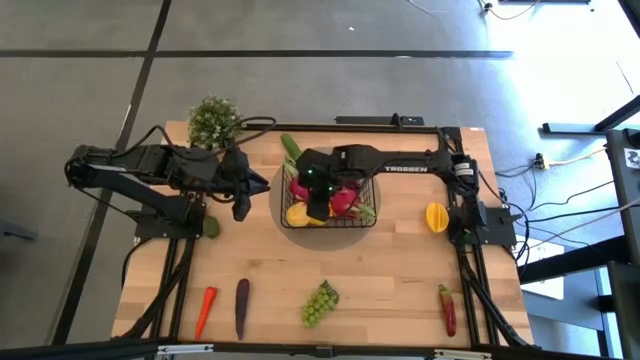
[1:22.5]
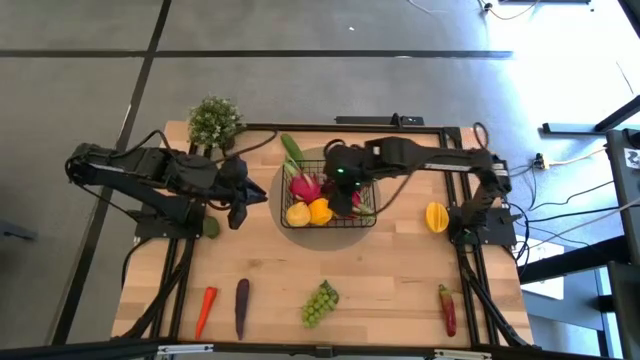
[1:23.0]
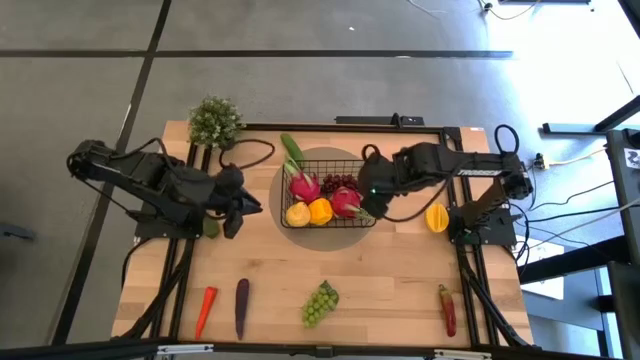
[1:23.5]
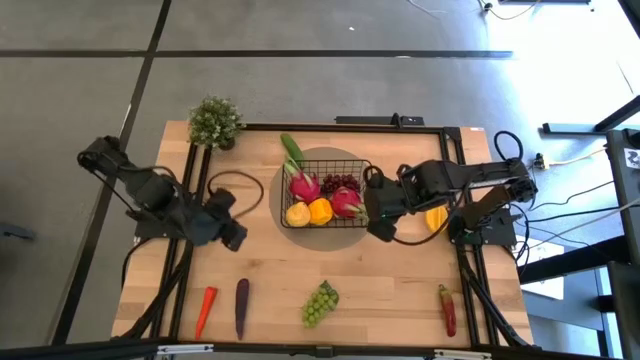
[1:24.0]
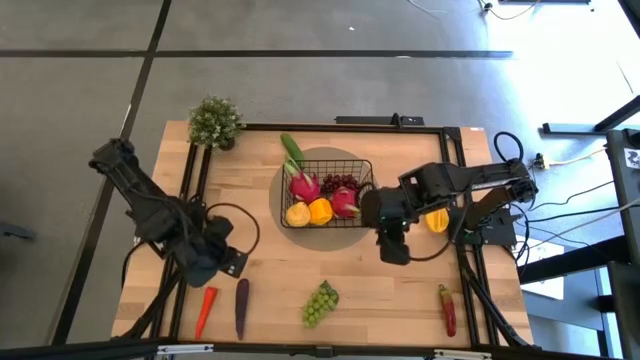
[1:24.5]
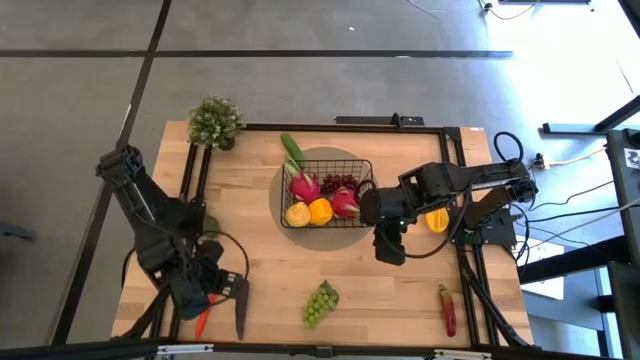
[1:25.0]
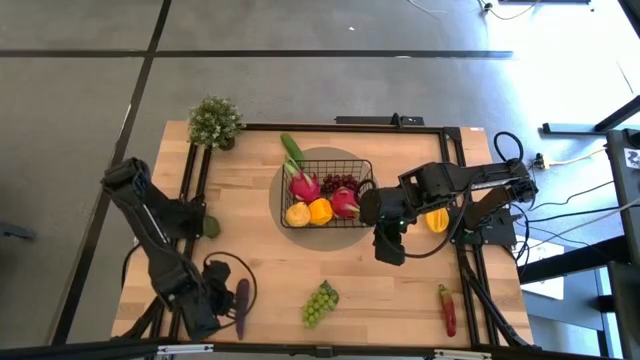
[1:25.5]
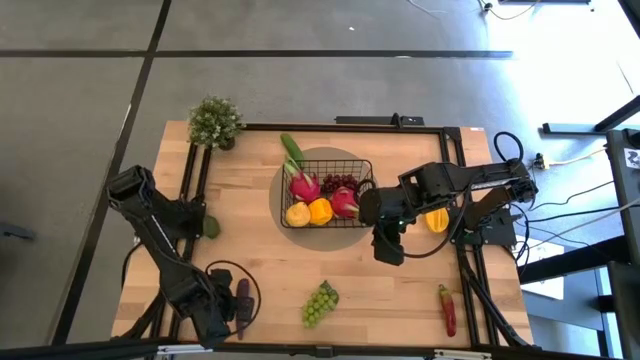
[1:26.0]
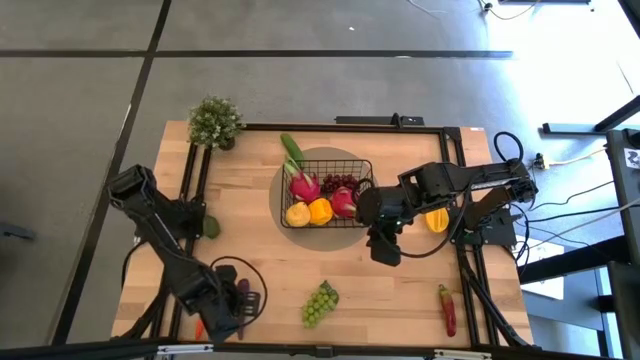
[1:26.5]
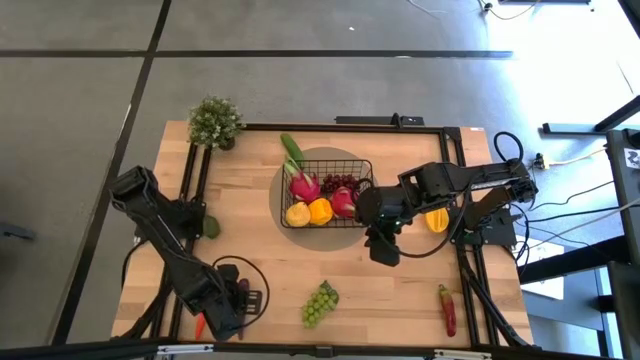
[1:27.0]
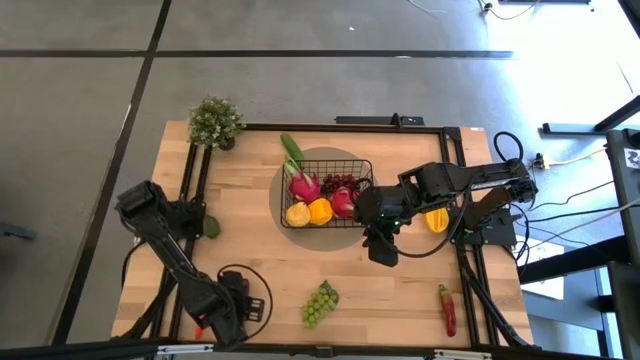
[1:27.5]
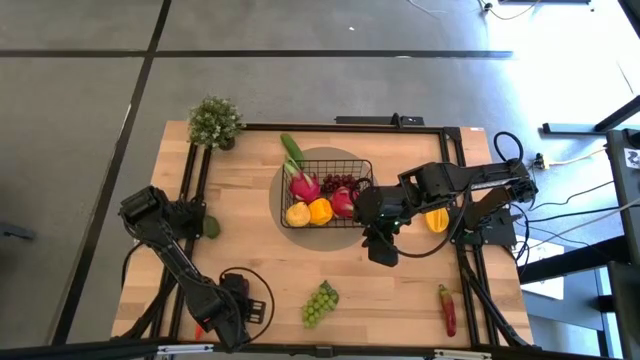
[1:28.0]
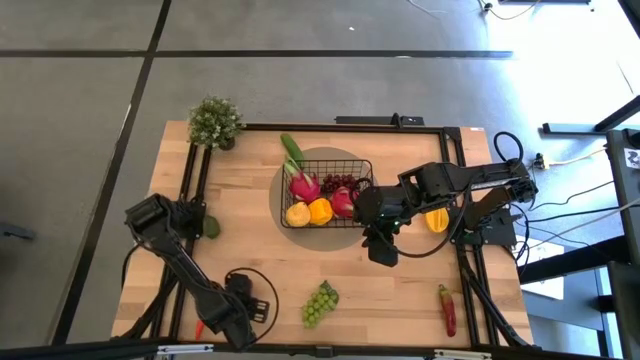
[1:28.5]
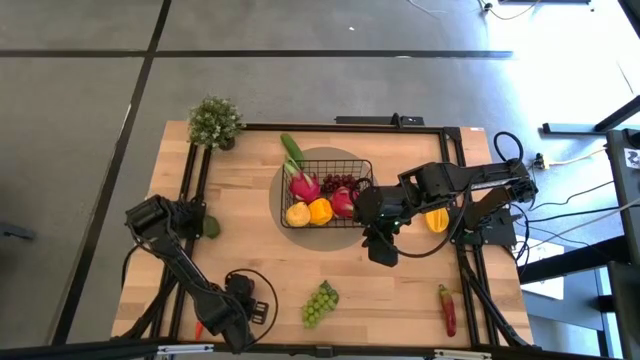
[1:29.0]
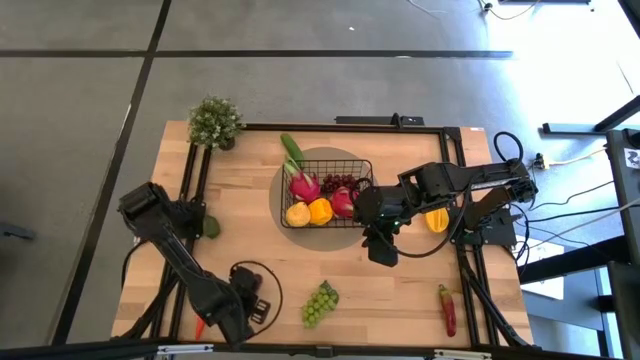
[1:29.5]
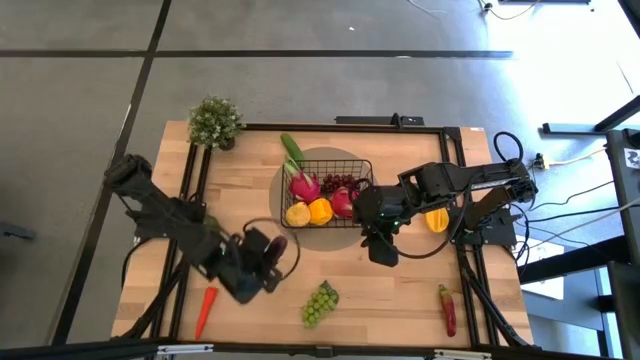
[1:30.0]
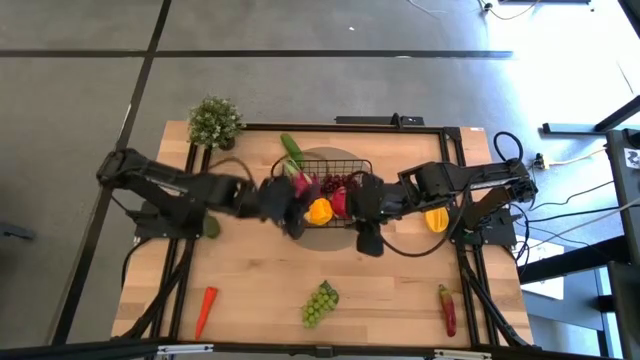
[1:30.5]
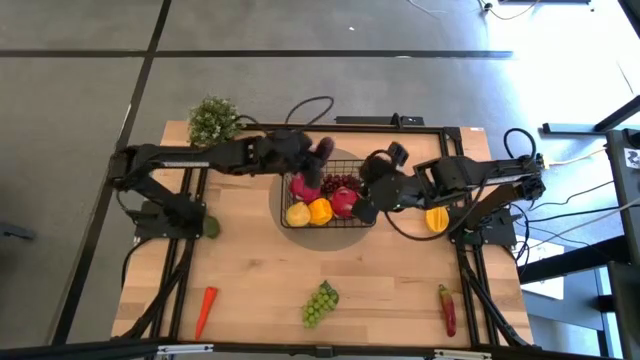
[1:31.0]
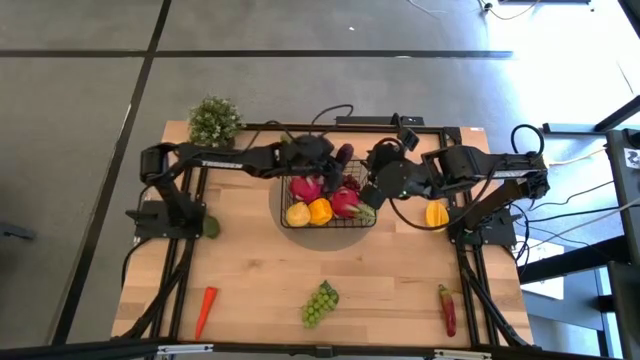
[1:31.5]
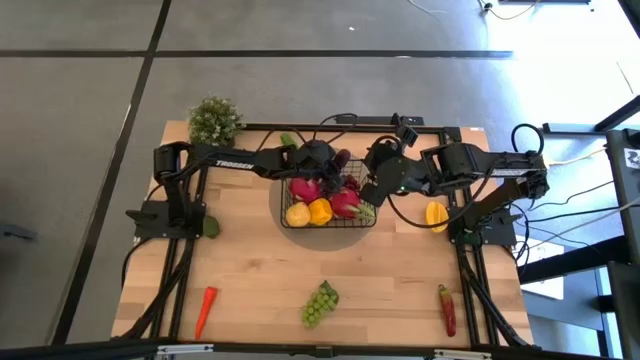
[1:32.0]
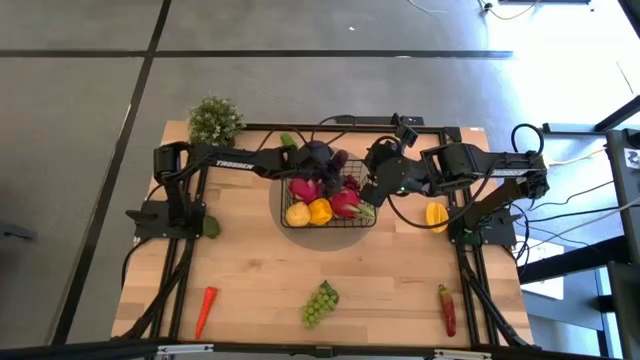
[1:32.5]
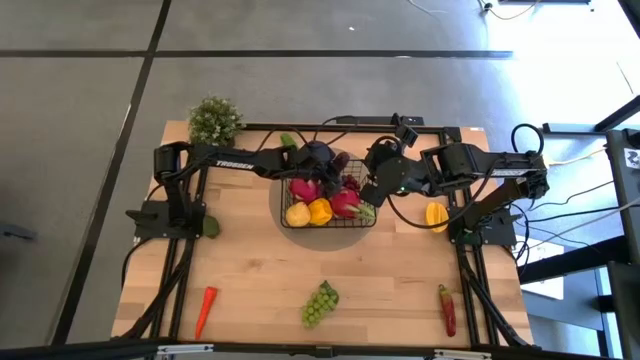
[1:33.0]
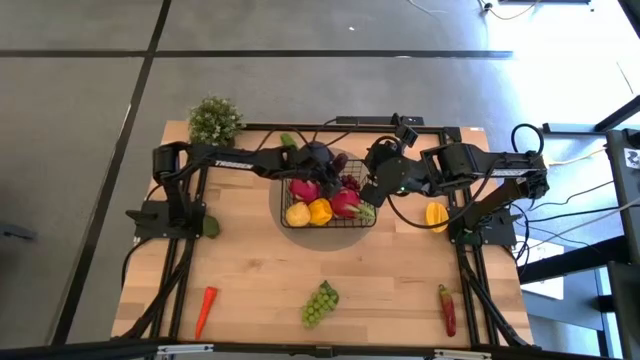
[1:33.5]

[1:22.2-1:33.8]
Task: Build produce basket
Put the purple eggplant into the black wire basket

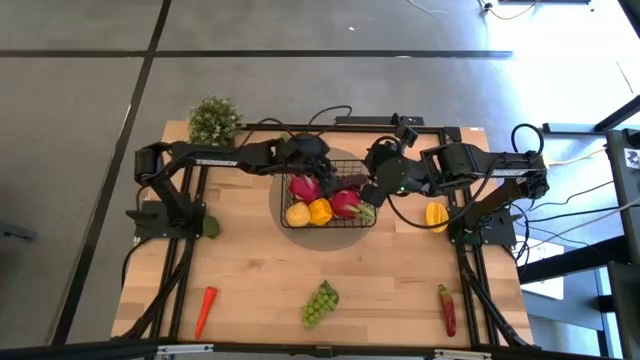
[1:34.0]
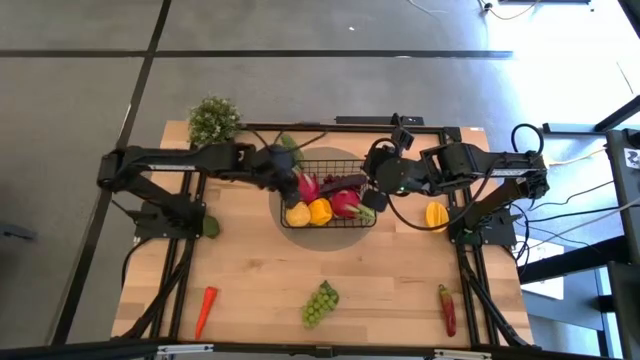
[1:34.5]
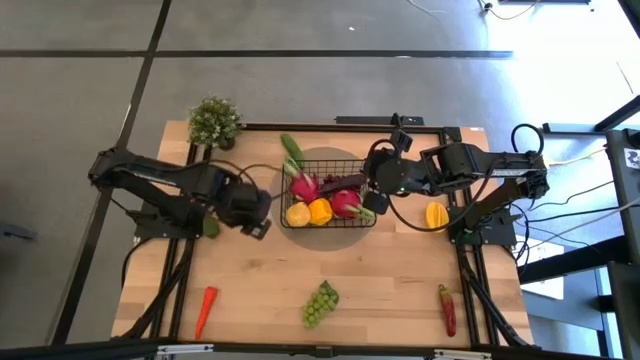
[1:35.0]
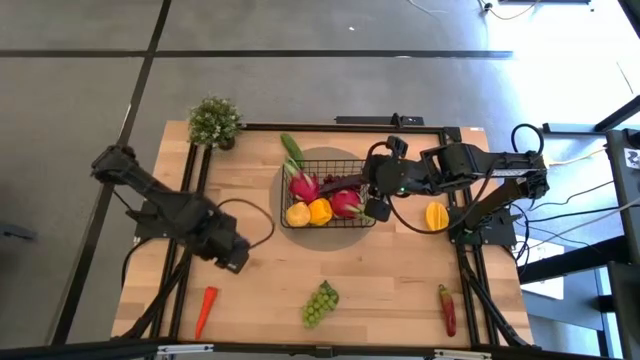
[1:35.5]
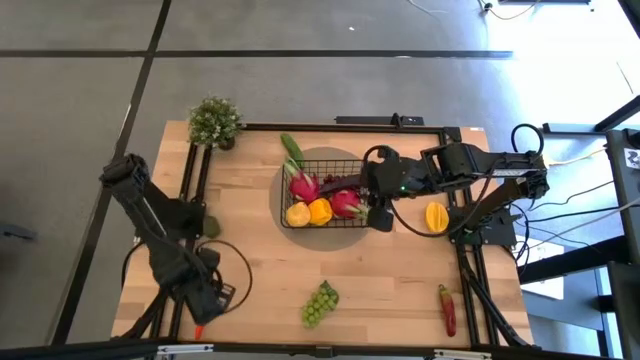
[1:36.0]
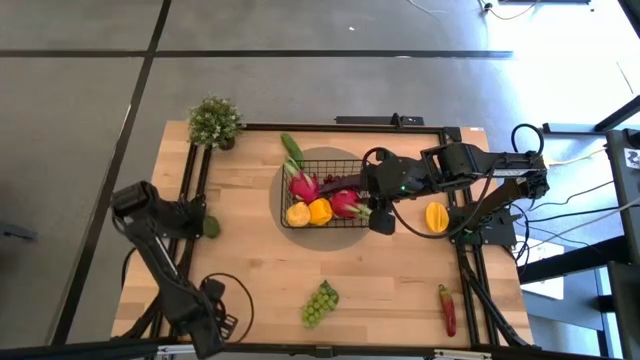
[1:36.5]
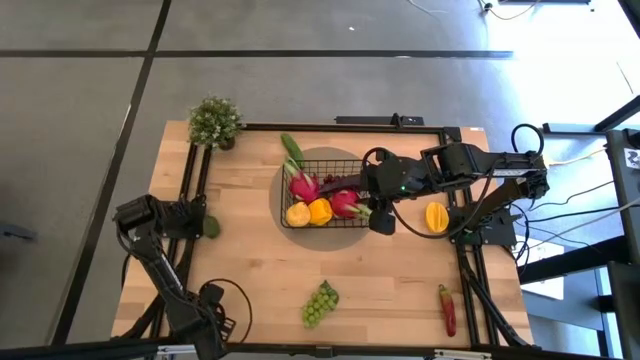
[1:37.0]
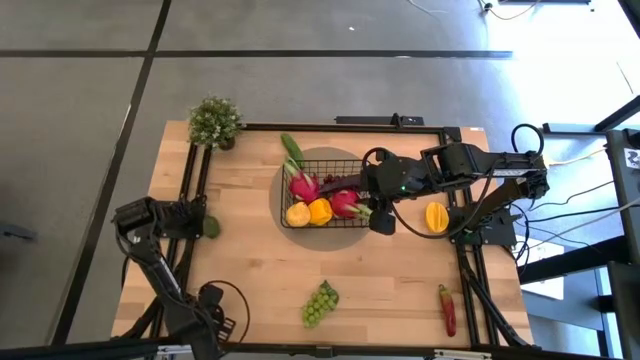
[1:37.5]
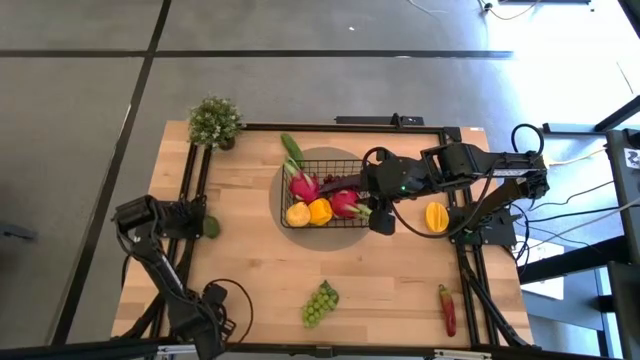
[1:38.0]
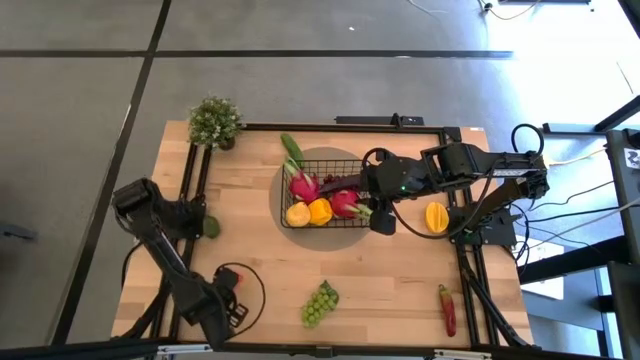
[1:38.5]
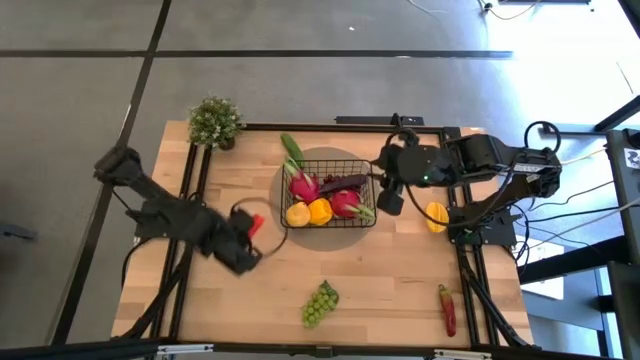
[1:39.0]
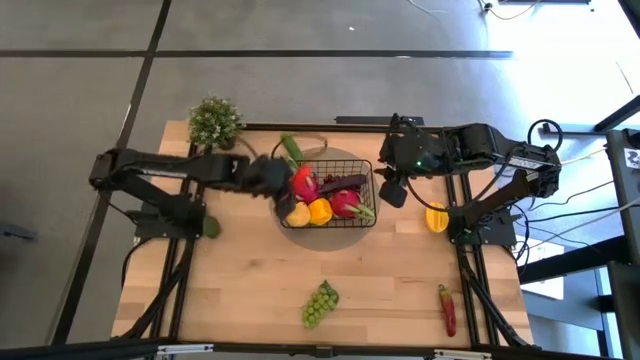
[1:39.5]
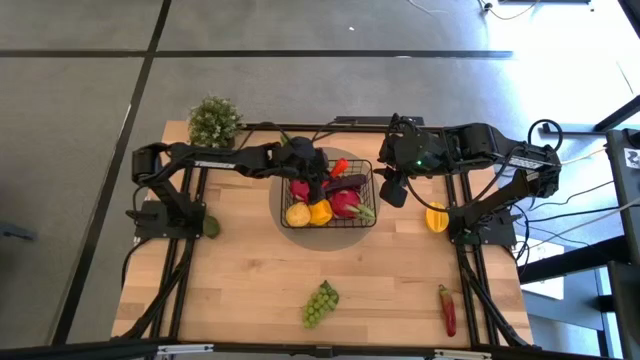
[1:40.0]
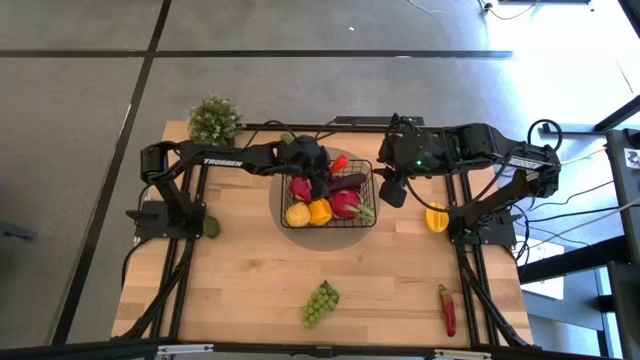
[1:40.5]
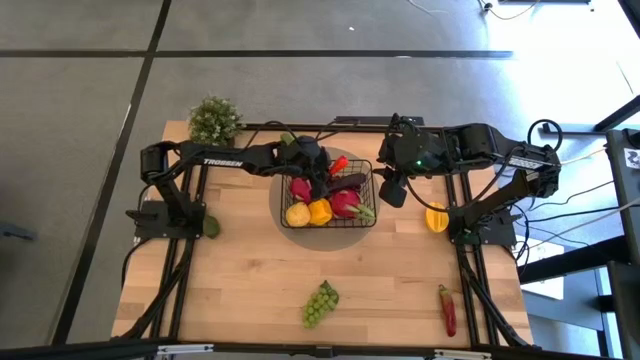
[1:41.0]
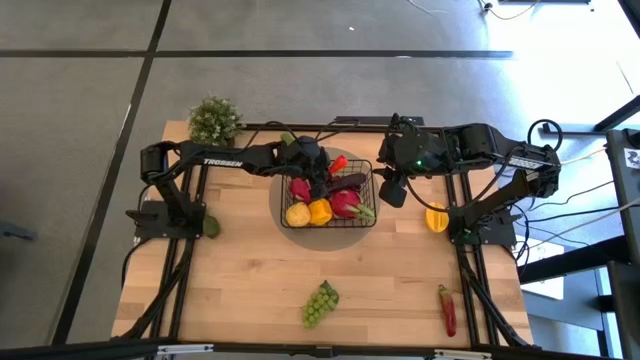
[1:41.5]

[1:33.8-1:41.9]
Put the orange carrot into the black wire basket
